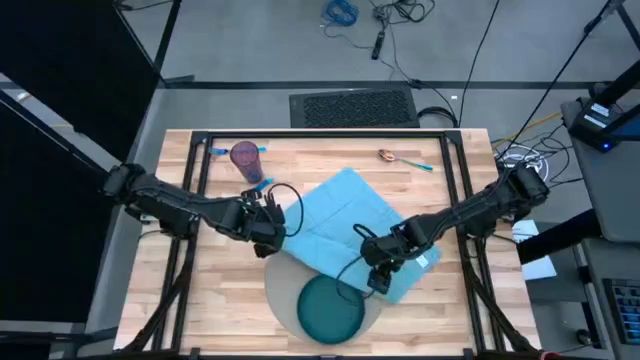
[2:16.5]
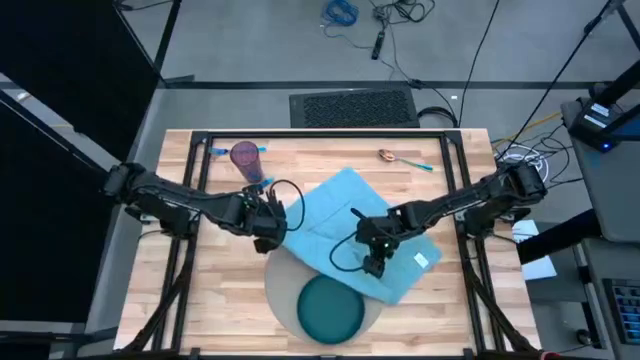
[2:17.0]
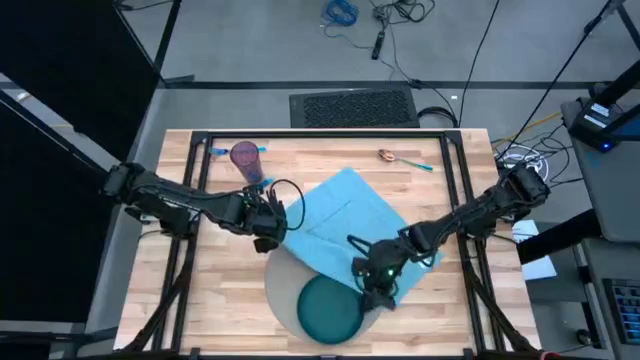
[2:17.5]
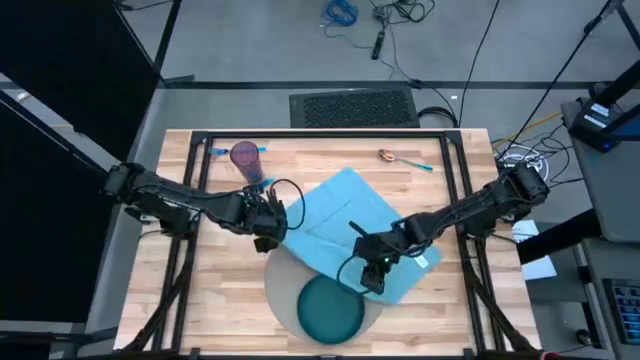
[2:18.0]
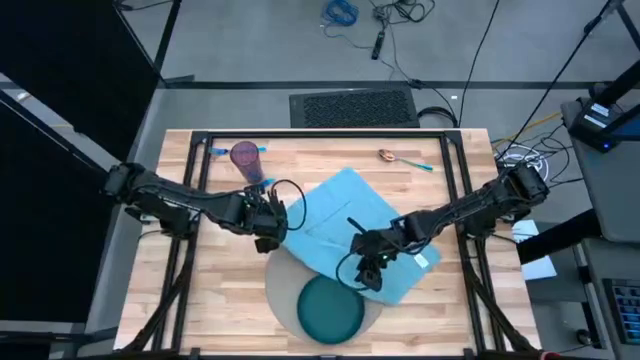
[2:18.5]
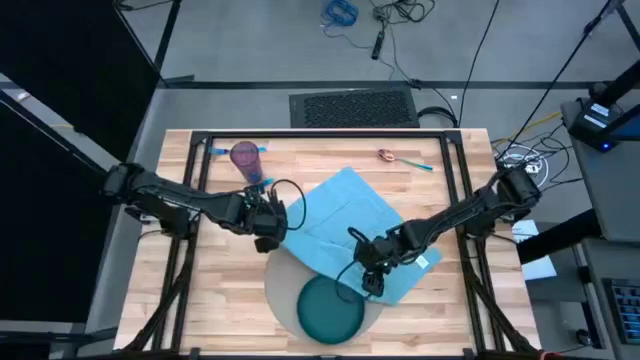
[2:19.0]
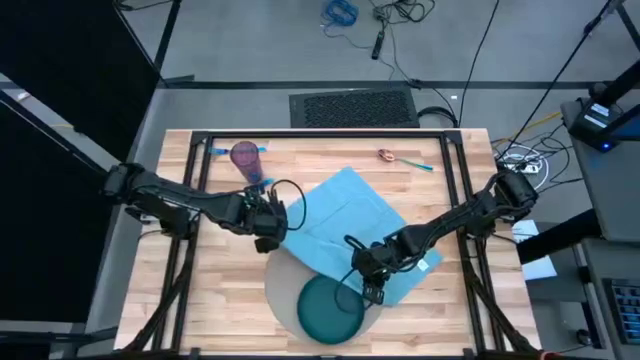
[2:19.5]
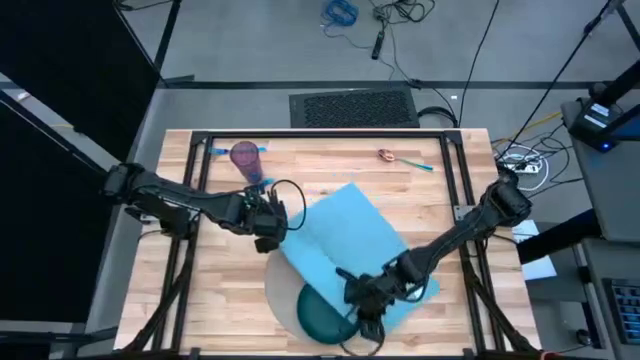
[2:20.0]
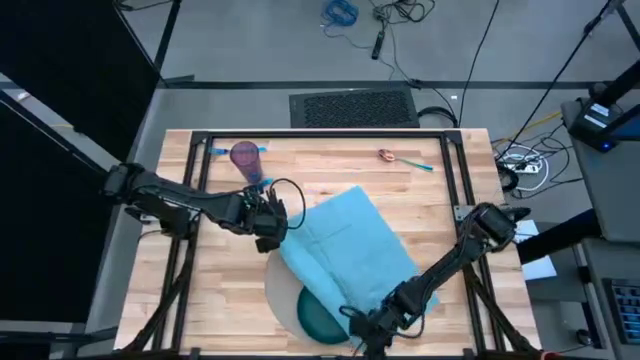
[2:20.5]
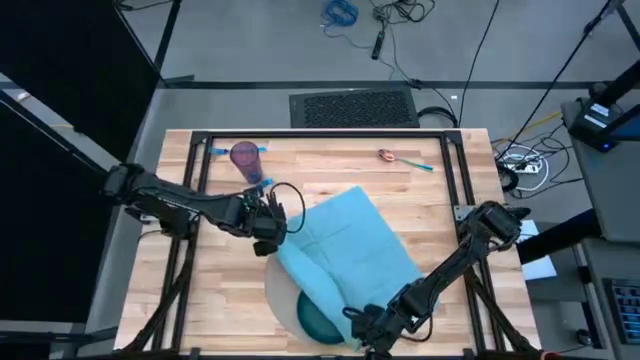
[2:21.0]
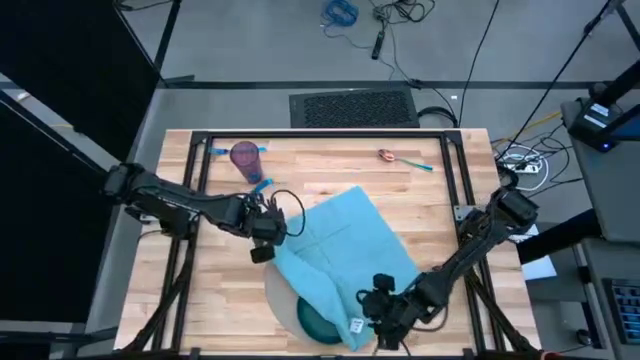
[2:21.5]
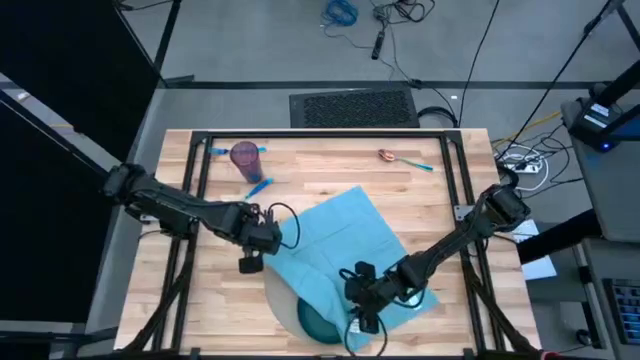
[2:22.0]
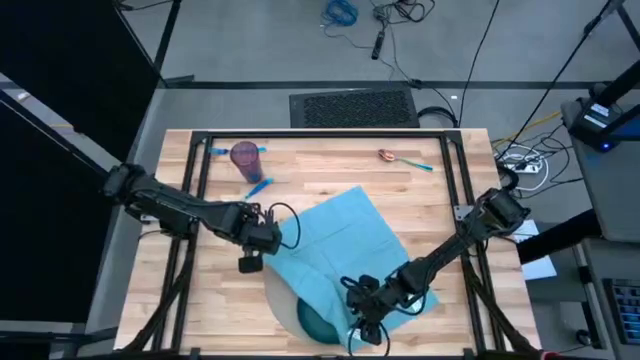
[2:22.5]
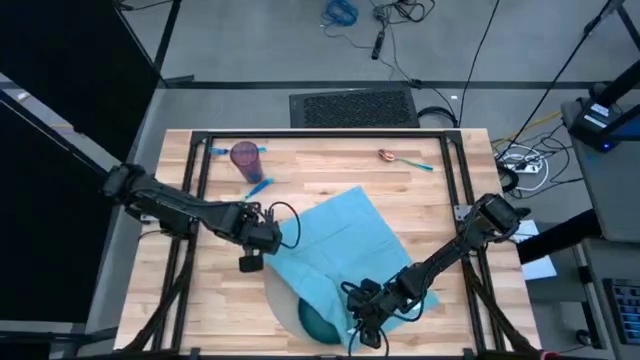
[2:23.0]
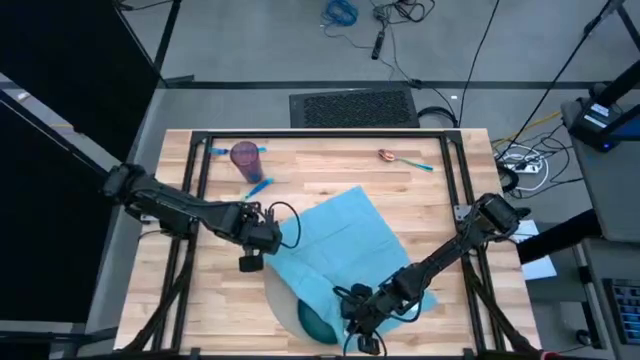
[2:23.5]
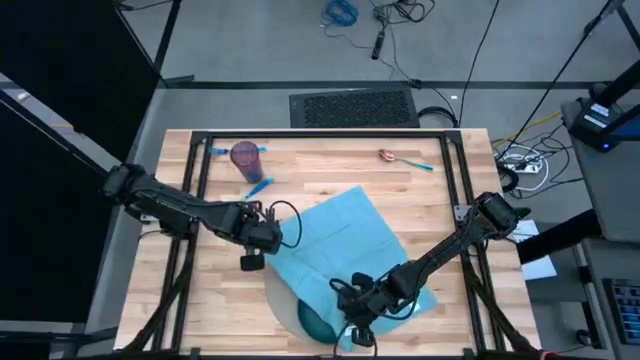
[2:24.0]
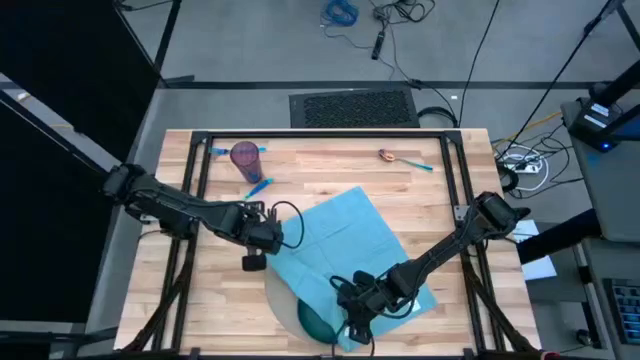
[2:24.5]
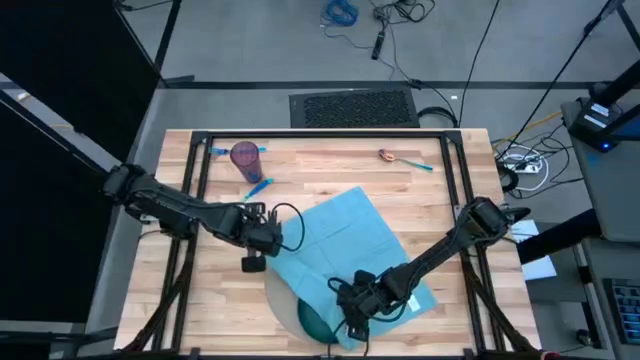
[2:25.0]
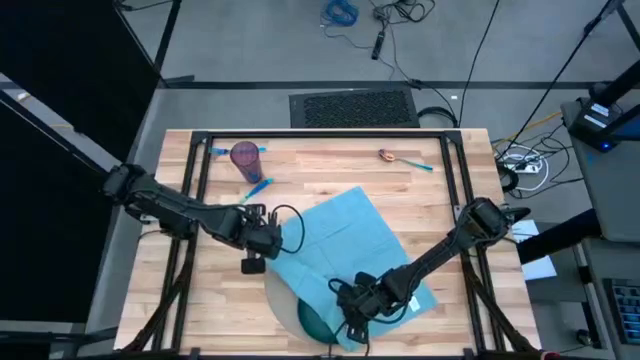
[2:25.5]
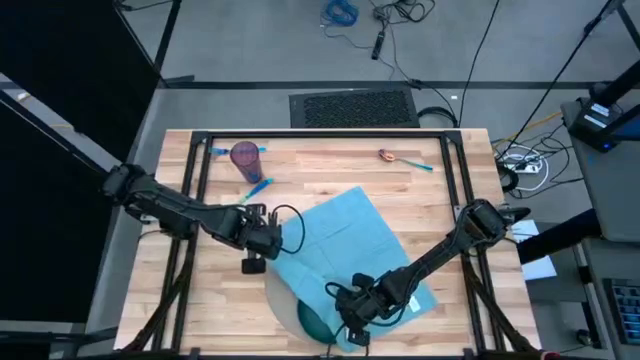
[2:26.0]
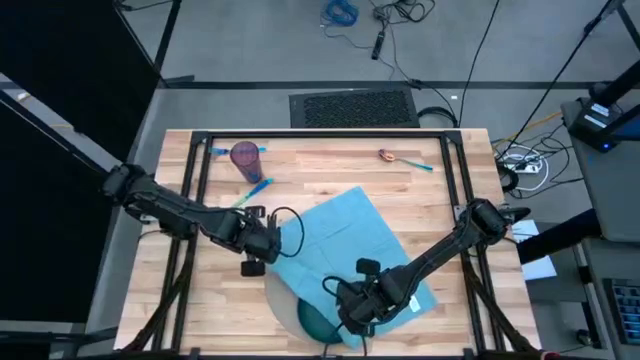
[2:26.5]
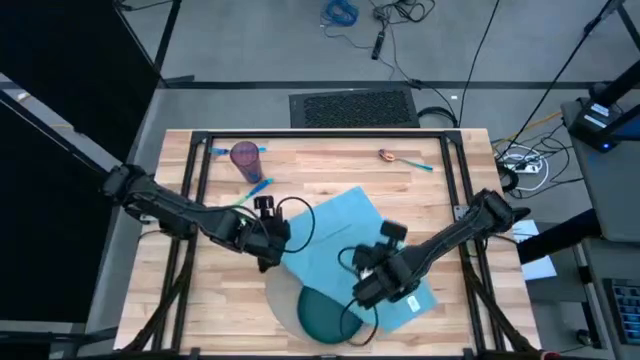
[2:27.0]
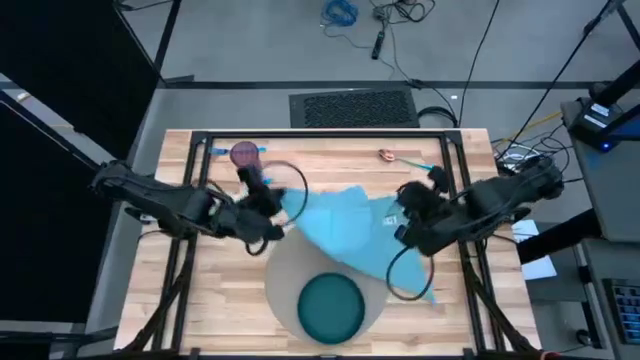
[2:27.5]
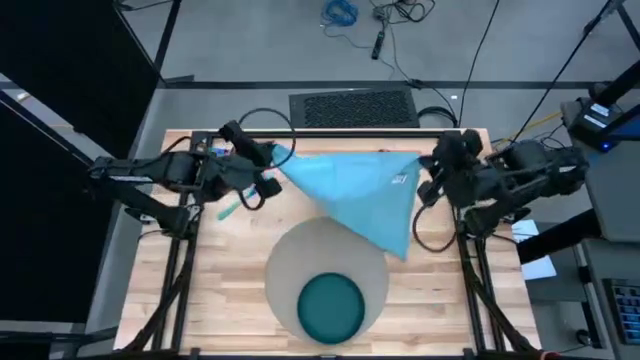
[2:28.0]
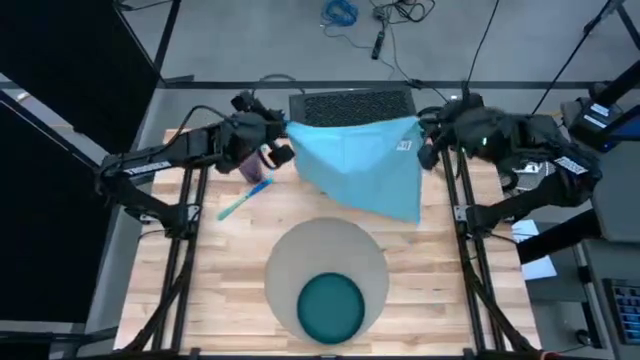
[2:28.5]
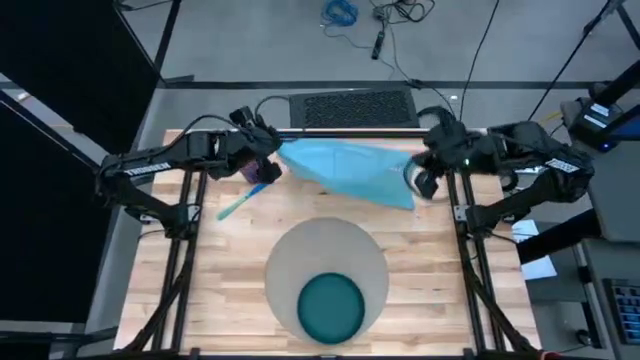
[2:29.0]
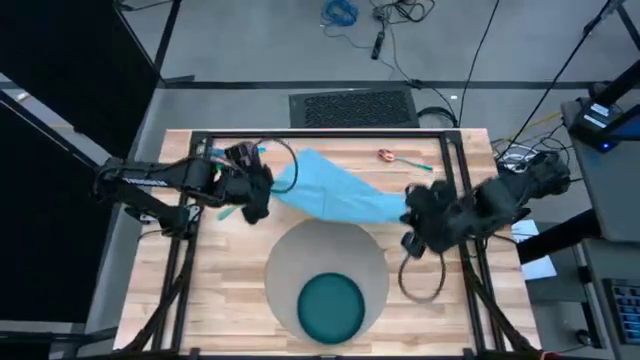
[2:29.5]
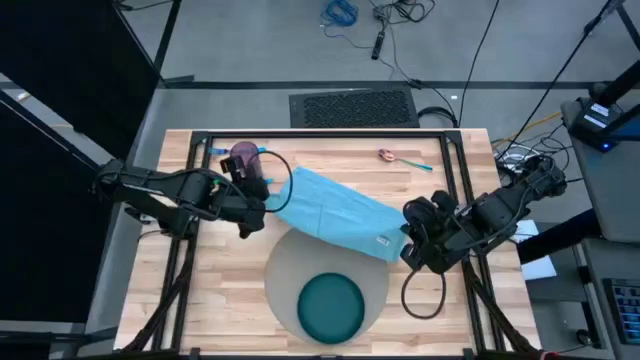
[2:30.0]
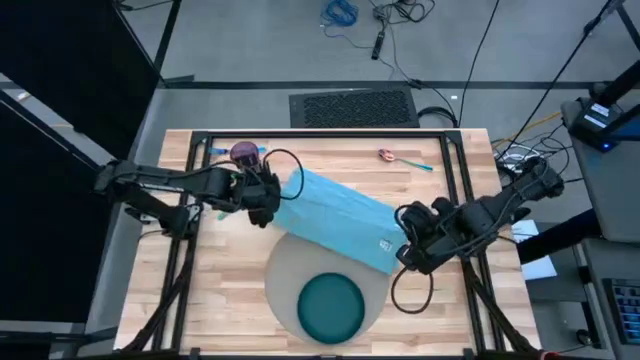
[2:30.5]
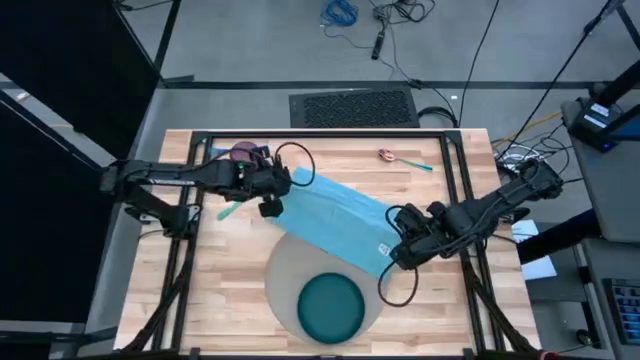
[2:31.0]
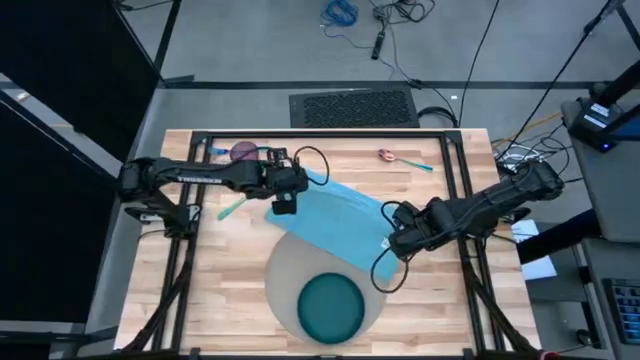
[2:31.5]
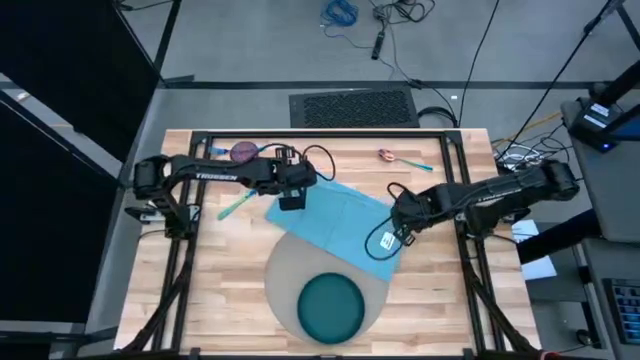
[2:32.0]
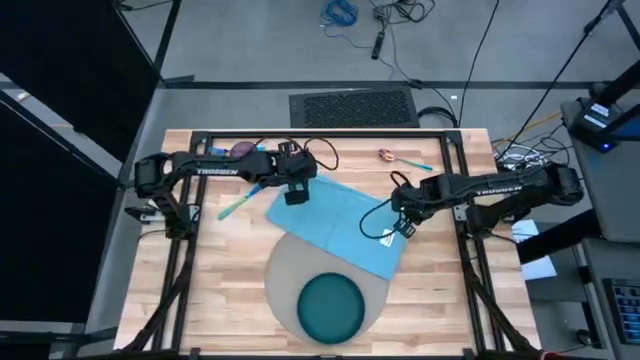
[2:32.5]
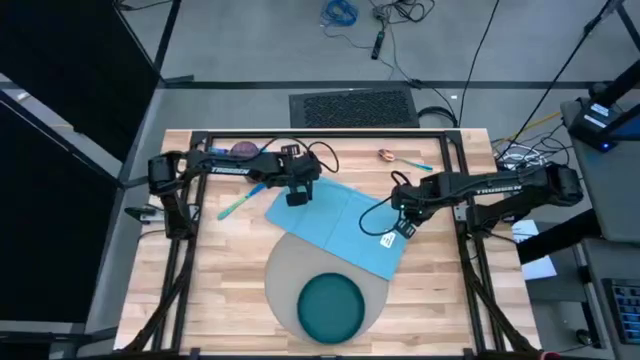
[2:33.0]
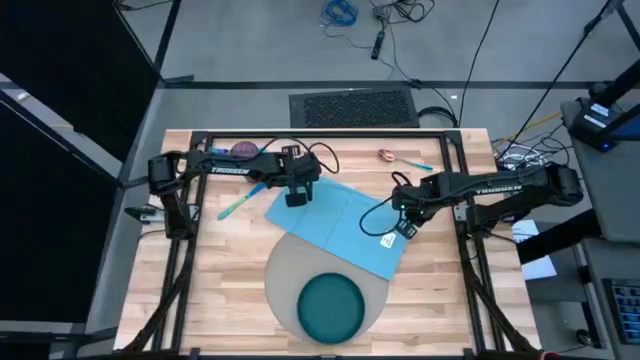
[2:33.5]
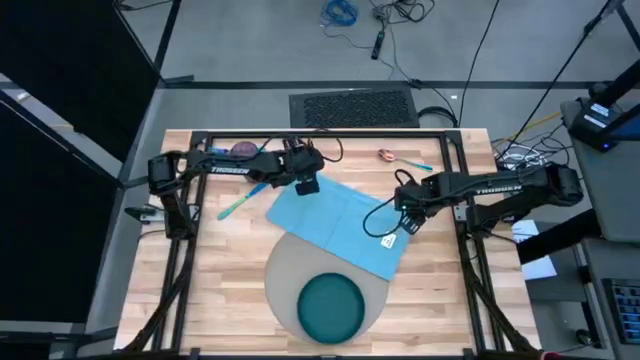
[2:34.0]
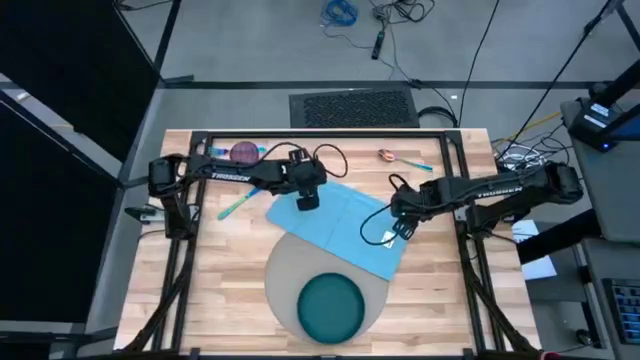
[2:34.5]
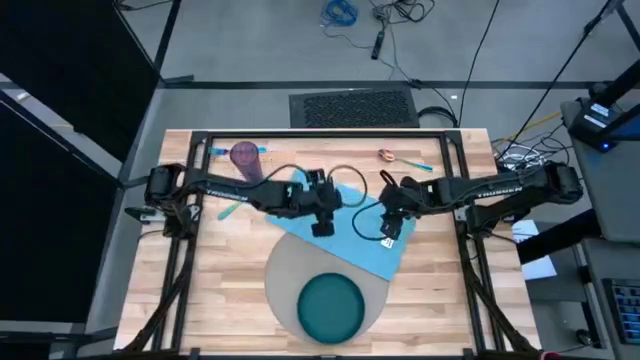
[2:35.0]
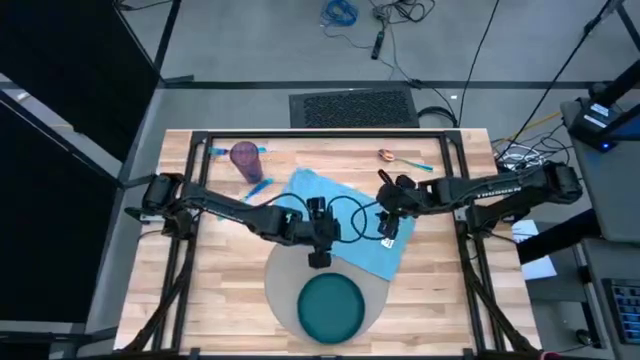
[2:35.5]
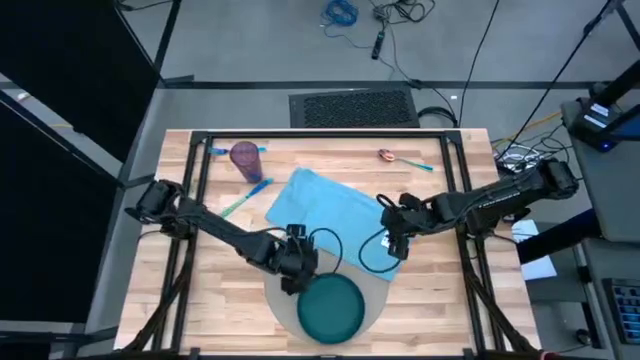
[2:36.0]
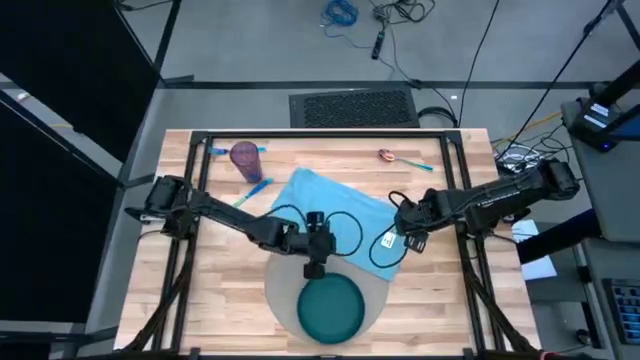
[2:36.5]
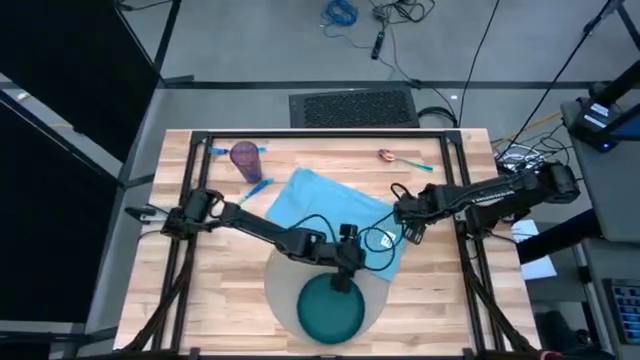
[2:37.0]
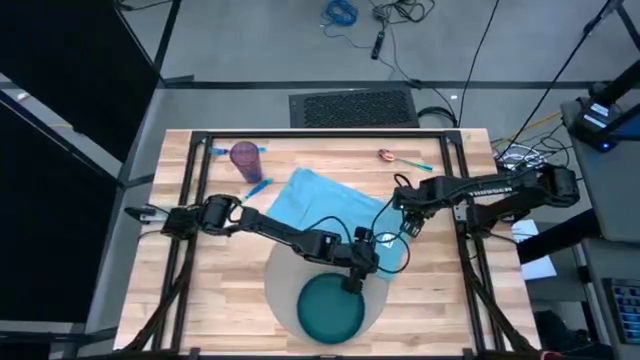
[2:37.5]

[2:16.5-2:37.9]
Task: Set table place
Fold the blue napkin
